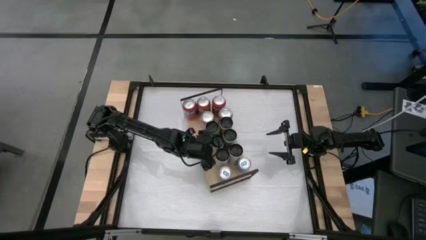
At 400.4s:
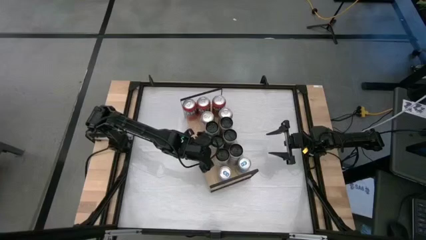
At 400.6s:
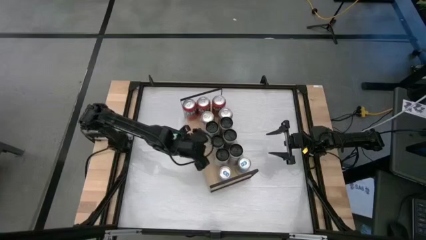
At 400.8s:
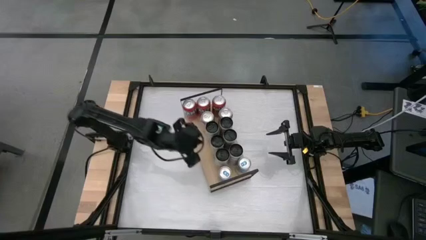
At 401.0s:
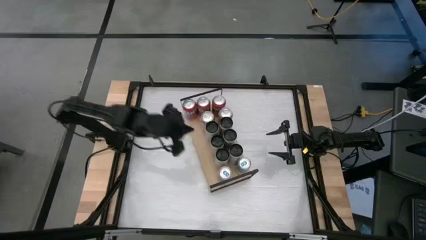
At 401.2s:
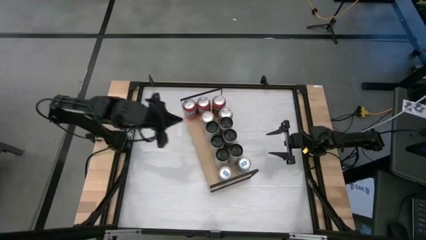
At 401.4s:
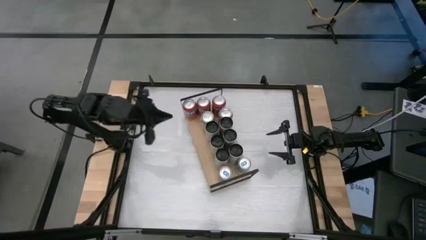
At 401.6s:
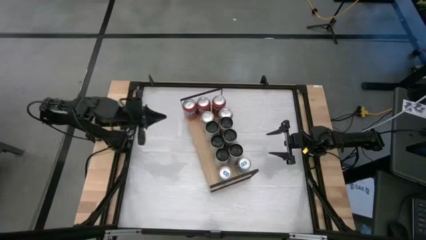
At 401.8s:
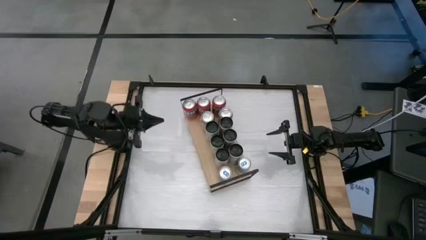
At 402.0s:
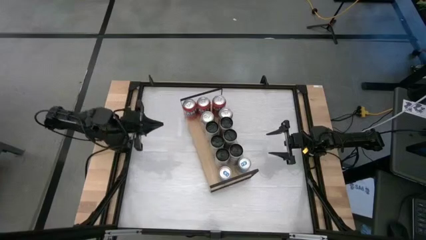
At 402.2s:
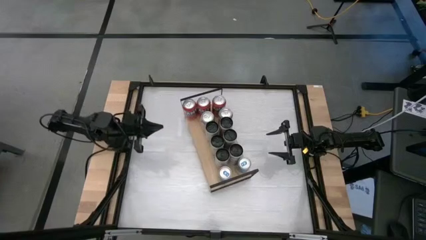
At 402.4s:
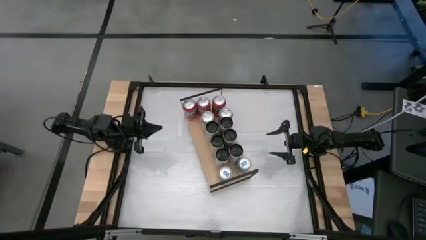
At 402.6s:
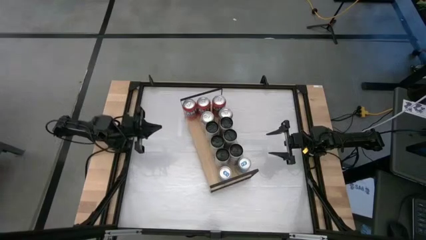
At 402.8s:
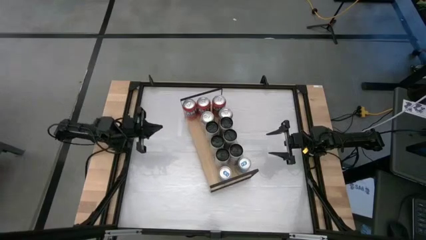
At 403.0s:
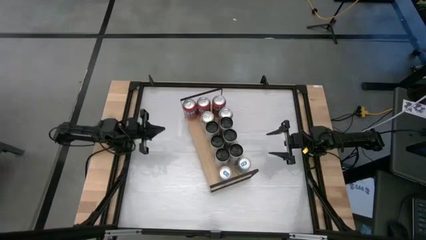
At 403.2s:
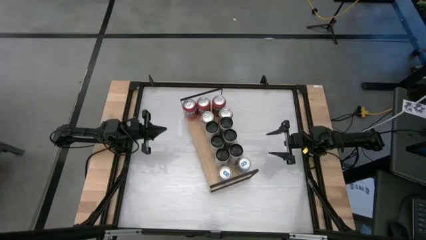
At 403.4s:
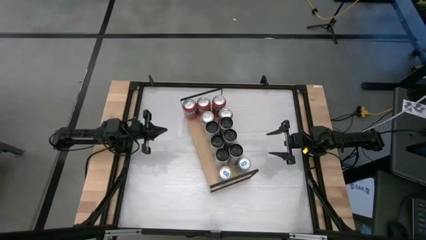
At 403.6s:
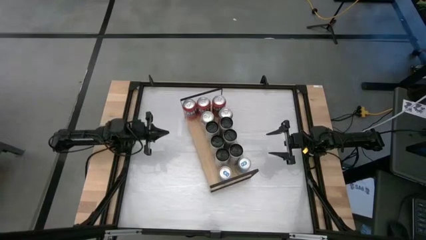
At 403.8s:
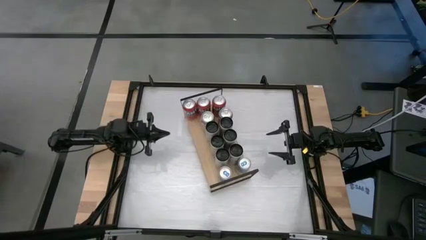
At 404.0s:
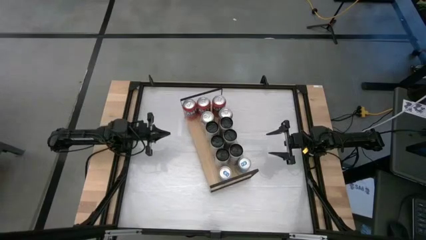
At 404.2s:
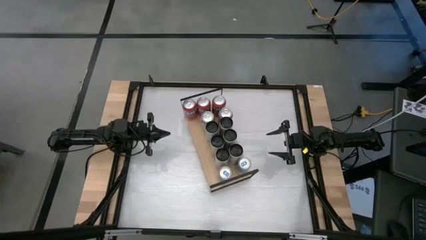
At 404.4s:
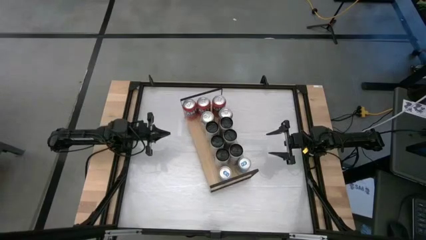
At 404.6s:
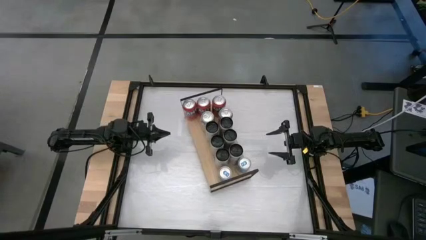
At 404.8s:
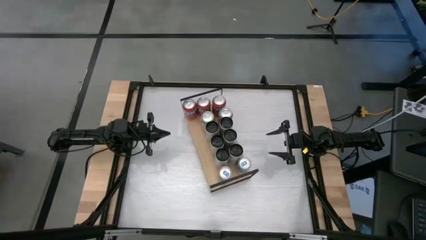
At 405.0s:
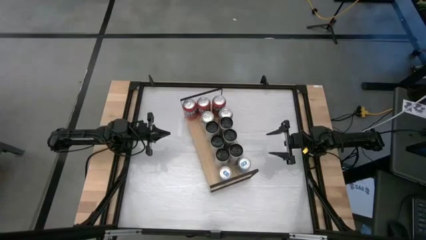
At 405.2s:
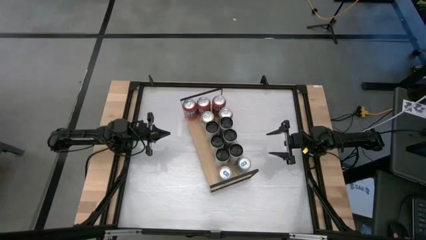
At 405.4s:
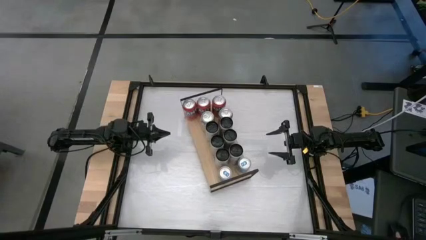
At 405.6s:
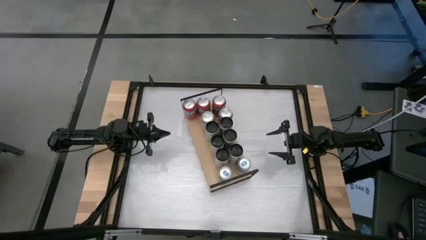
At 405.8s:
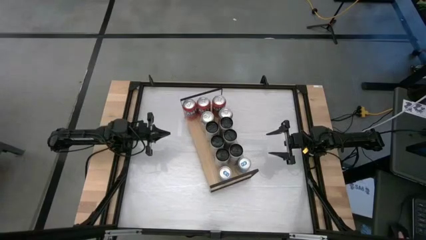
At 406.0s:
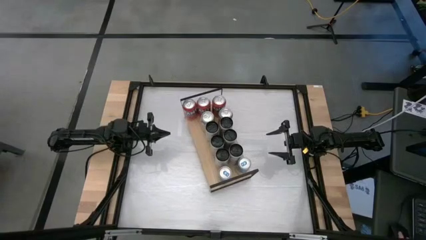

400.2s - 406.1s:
Task: Place canned beverage on shelf
Return to Home Position

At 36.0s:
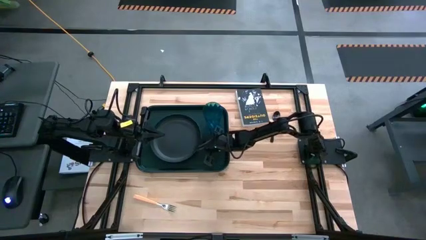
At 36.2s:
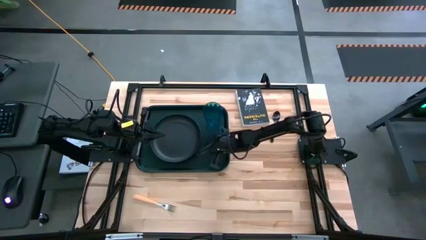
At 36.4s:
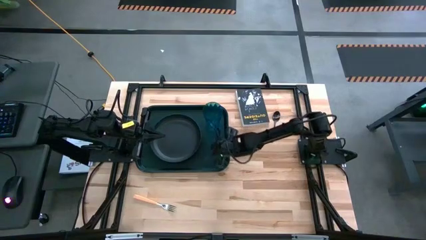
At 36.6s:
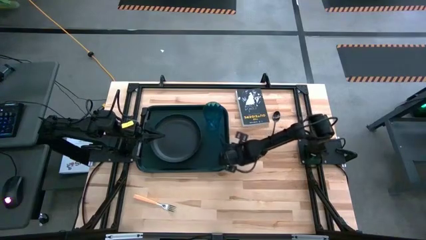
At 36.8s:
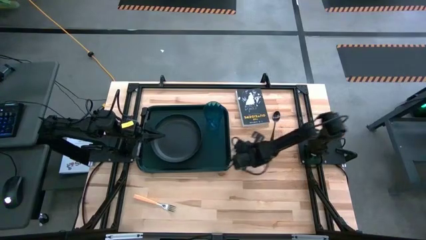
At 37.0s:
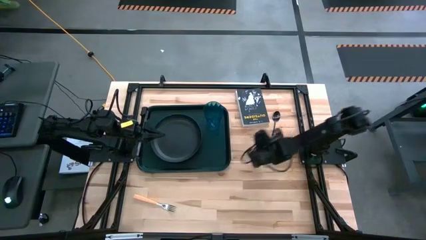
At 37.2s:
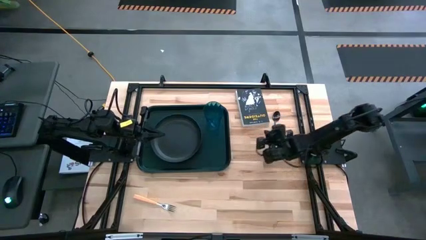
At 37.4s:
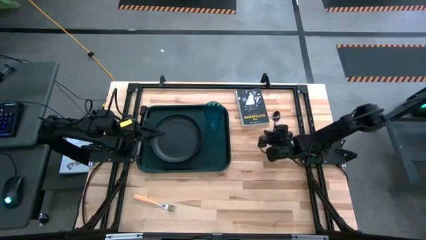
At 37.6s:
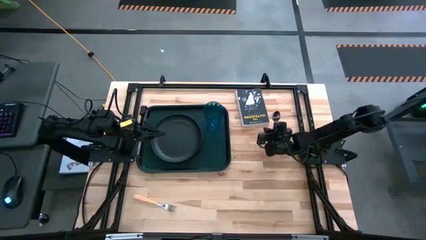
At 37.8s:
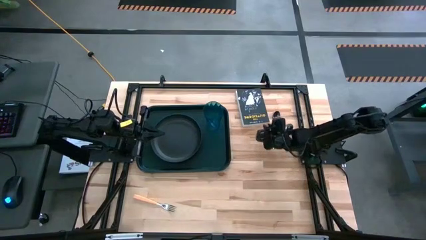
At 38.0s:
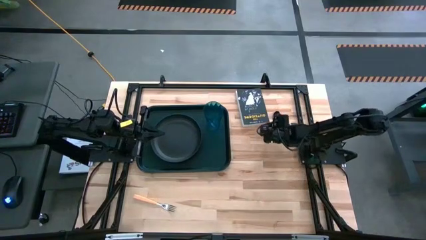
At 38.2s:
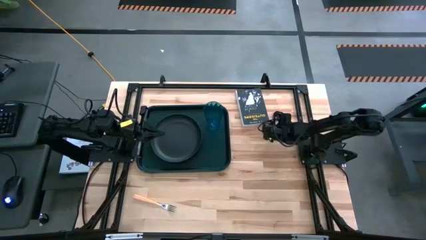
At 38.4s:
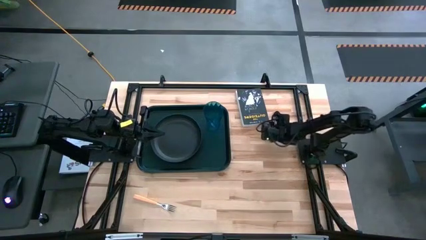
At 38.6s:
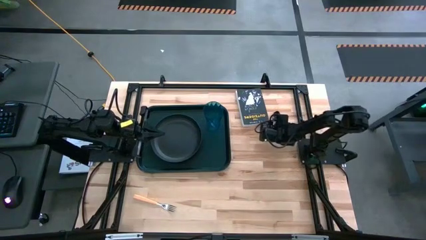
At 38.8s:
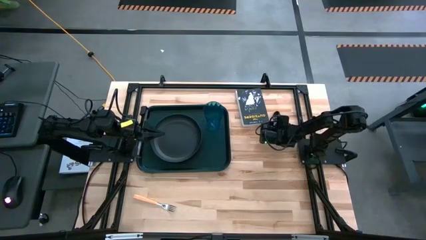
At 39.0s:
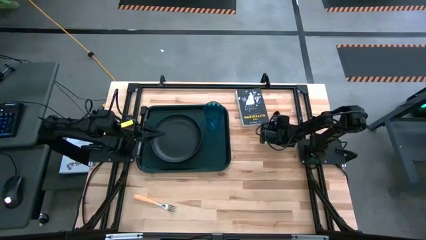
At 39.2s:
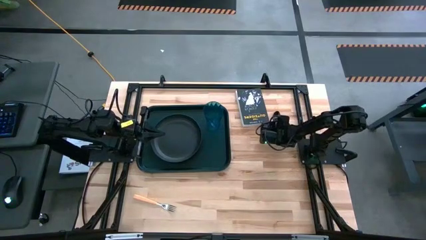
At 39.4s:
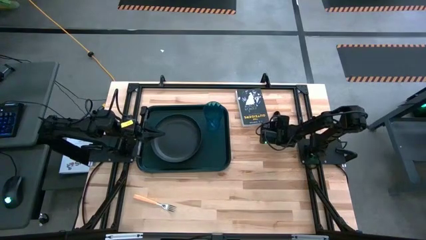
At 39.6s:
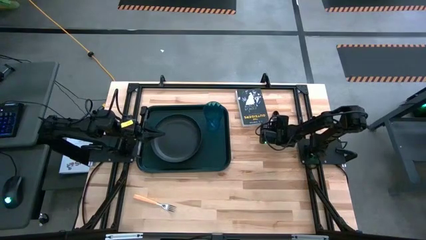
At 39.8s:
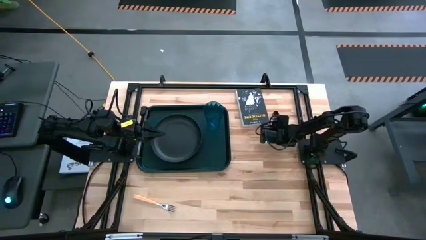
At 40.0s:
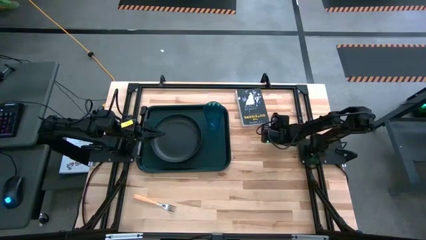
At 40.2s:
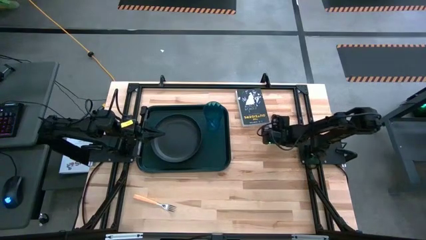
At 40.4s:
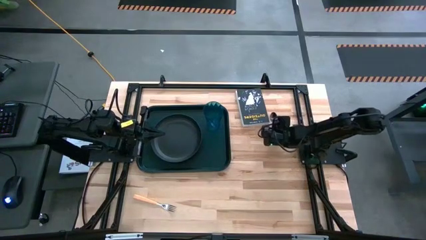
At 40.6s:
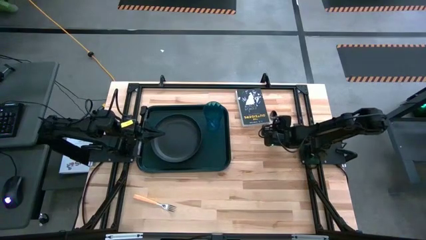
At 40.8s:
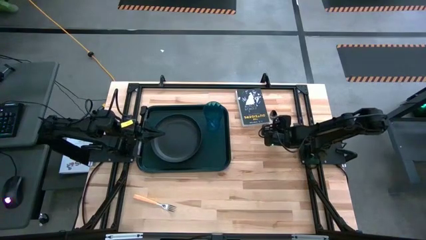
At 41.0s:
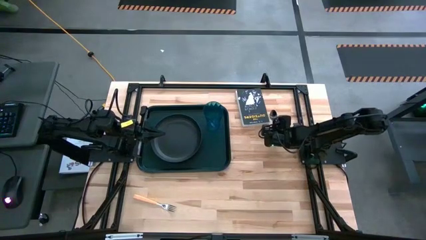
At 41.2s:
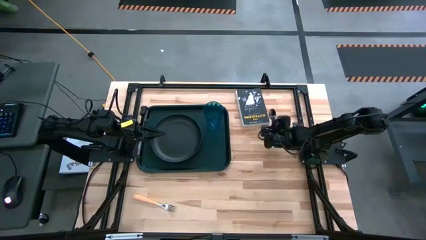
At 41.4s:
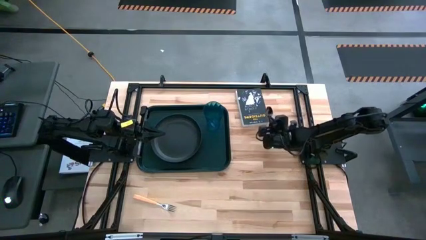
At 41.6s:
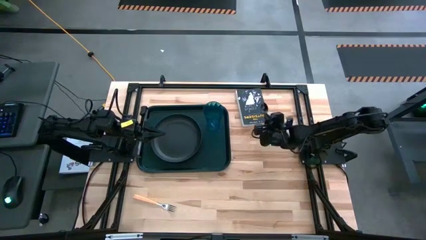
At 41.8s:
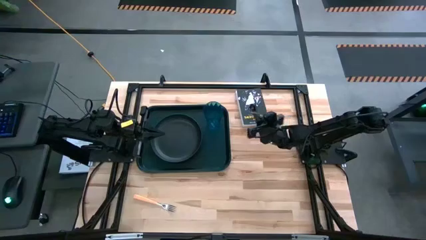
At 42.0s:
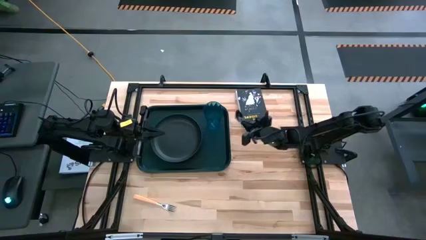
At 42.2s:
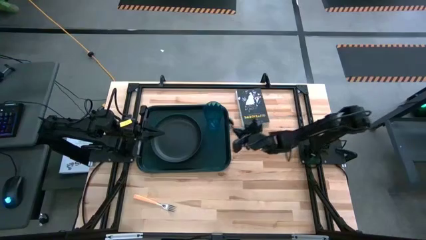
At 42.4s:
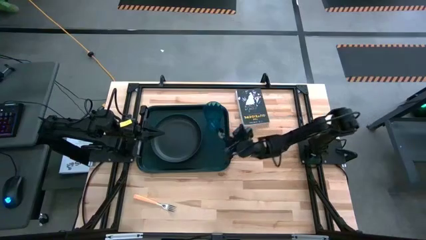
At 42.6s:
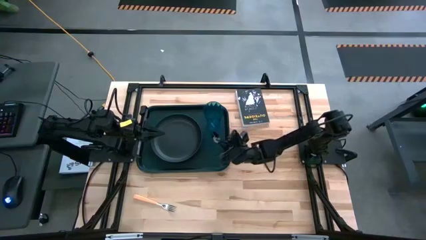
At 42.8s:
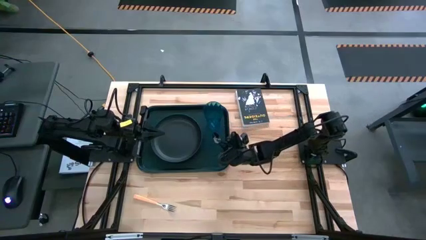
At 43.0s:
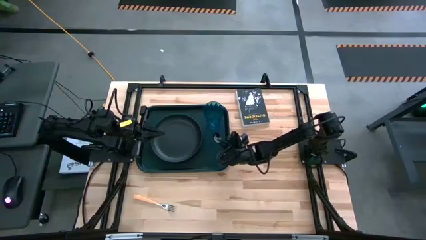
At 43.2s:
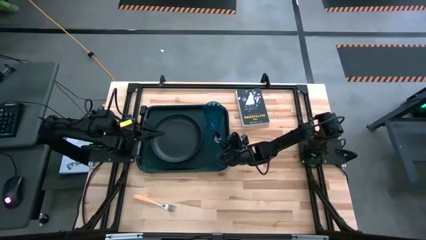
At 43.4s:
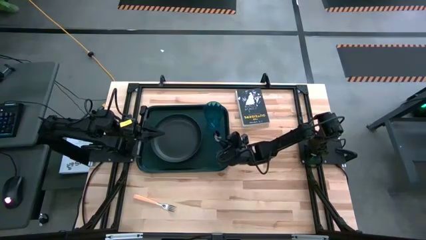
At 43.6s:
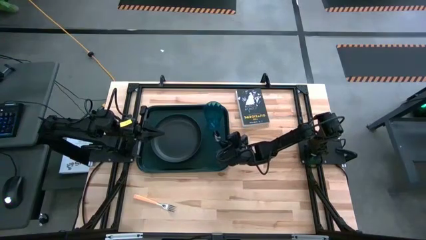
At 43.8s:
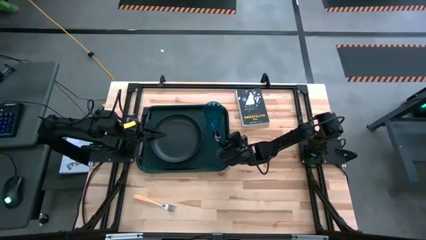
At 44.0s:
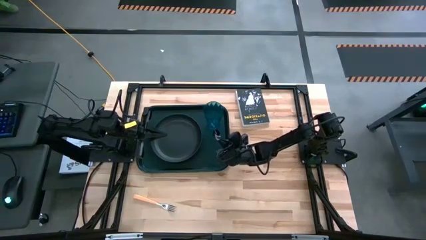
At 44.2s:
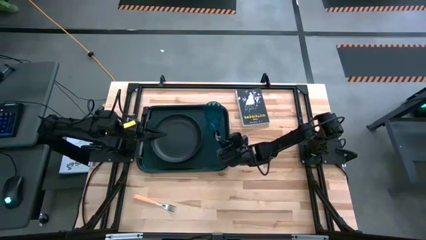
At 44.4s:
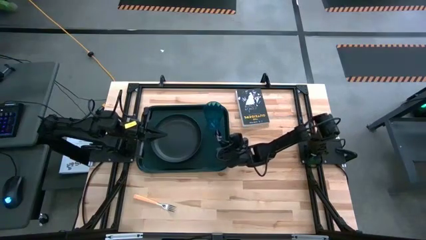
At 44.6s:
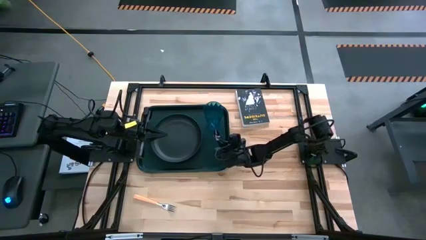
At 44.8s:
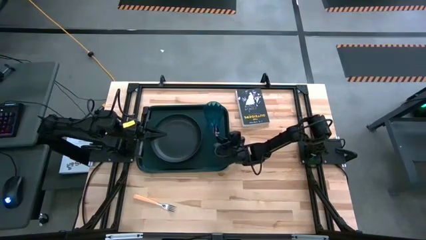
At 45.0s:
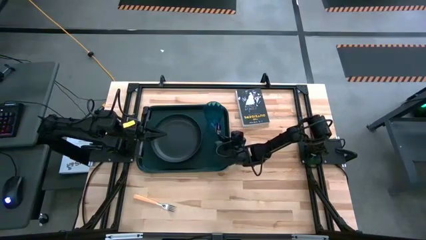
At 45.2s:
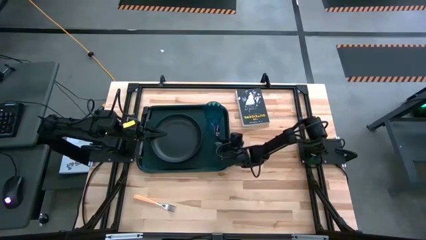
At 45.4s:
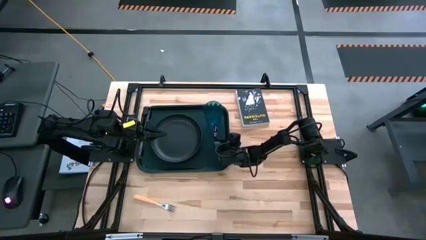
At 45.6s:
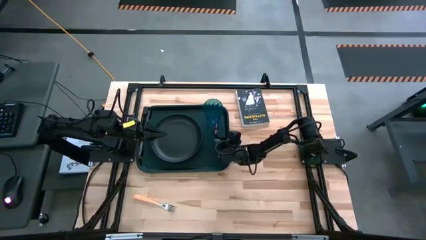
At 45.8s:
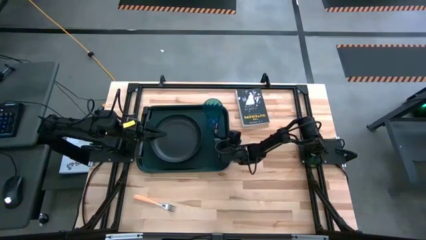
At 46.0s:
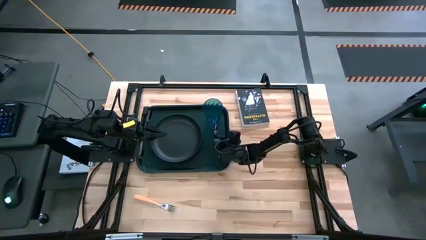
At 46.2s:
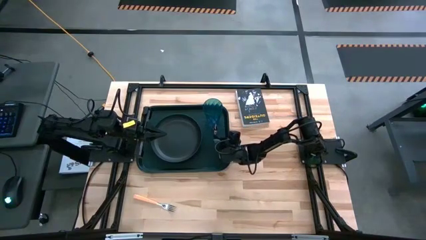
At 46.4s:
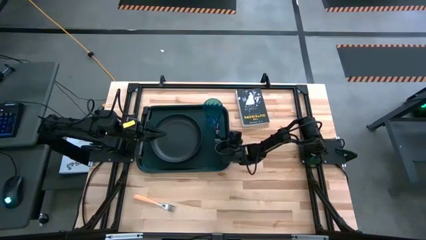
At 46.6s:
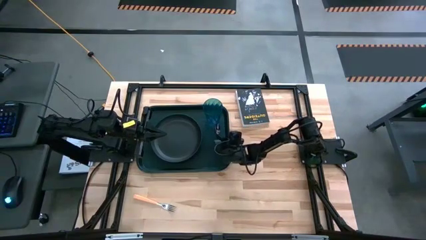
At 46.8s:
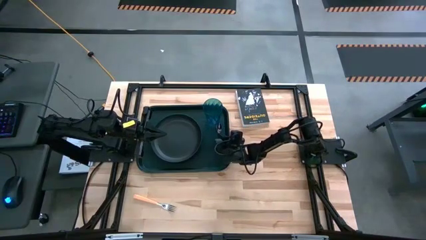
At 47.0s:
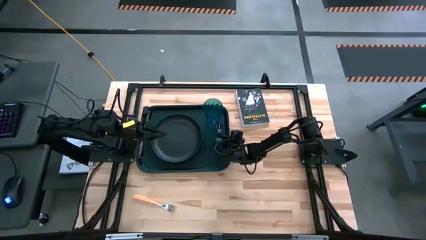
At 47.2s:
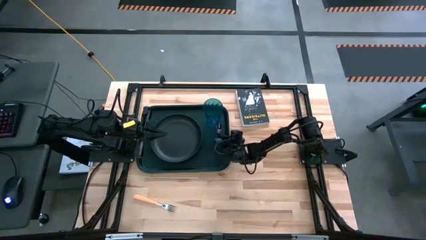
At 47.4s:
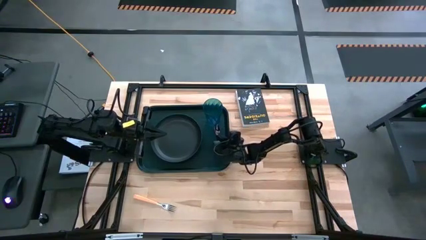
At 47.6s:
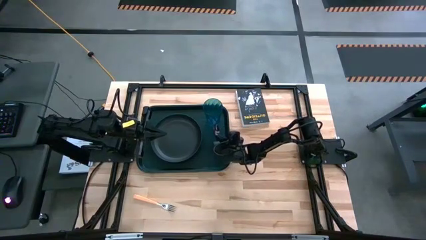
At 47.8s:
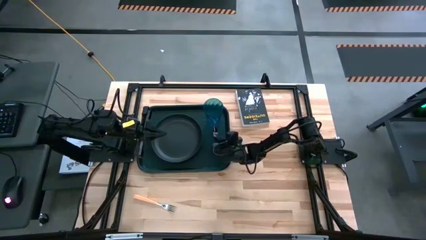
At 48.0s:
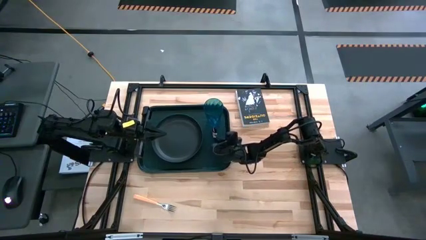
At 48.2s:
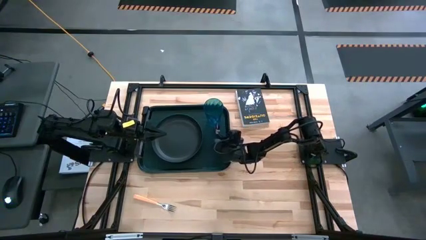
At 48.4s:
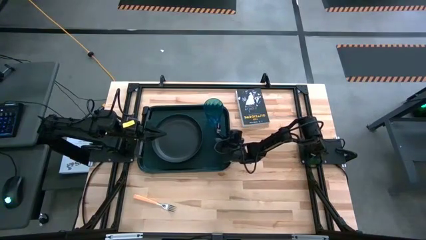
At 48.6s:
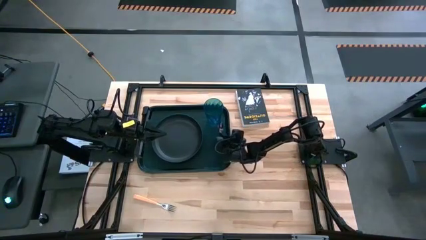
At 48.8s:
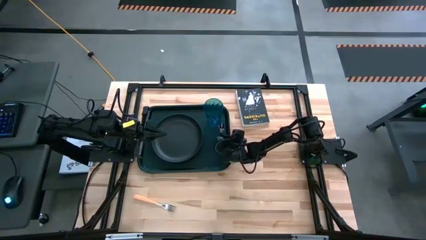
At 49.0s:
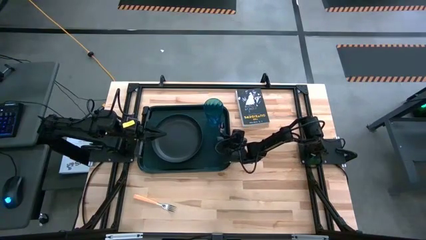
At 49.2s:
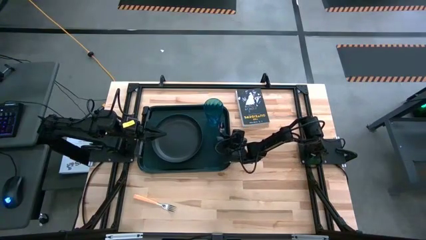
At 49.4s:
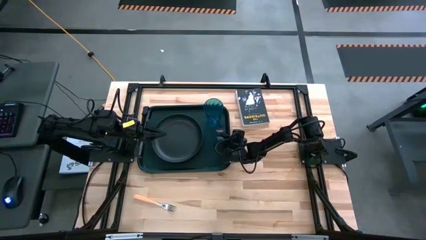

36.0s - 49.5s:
Task: Pick and place plate/cup/fork/spoon on tray
Put the black spoon on the right of the black tray
